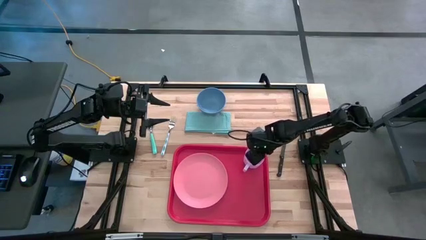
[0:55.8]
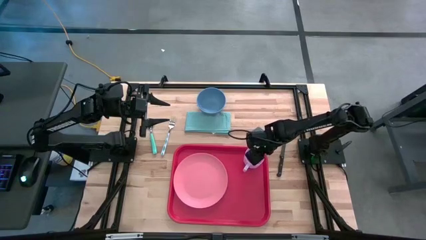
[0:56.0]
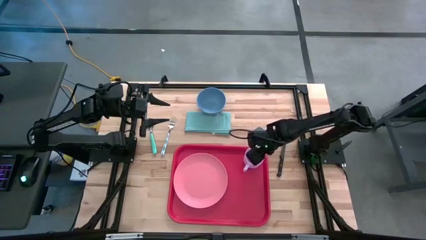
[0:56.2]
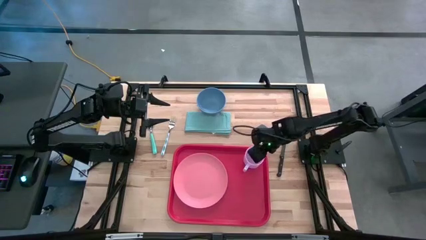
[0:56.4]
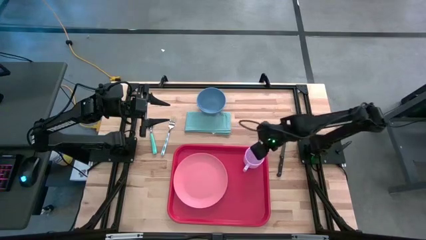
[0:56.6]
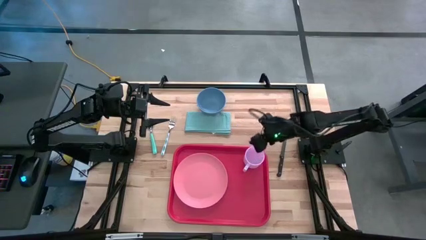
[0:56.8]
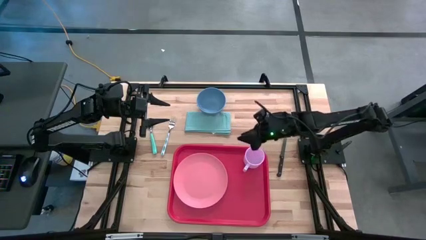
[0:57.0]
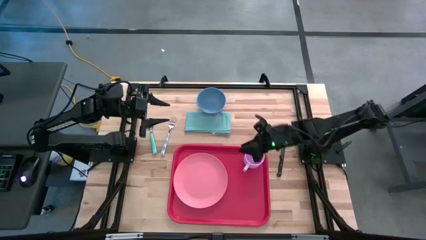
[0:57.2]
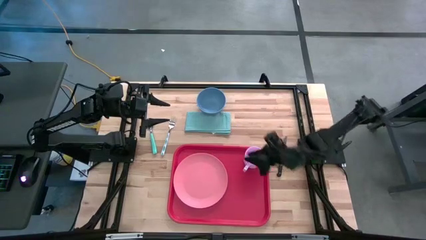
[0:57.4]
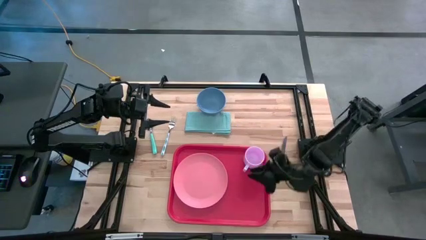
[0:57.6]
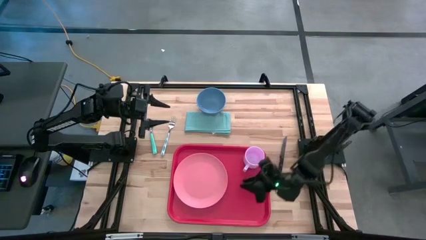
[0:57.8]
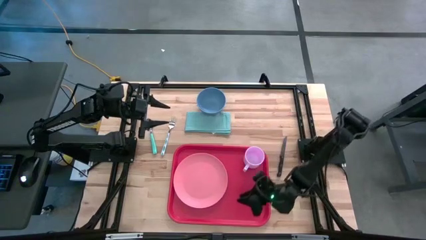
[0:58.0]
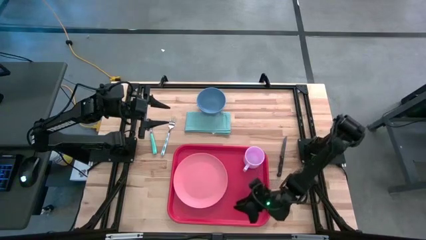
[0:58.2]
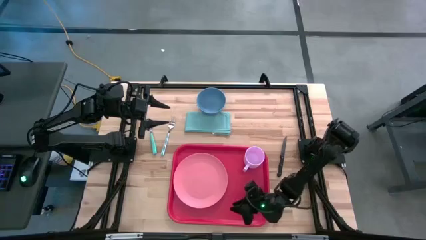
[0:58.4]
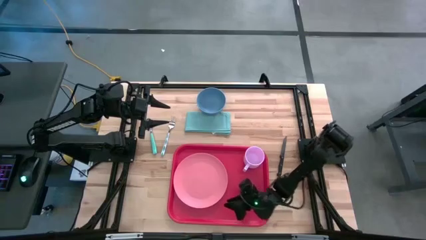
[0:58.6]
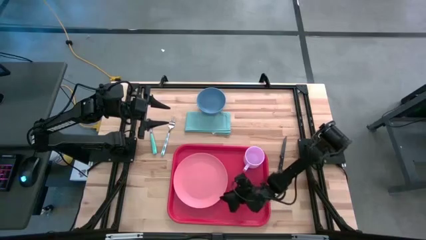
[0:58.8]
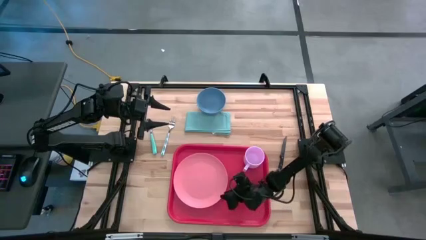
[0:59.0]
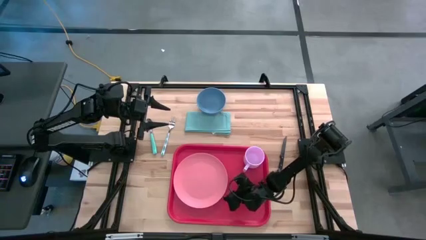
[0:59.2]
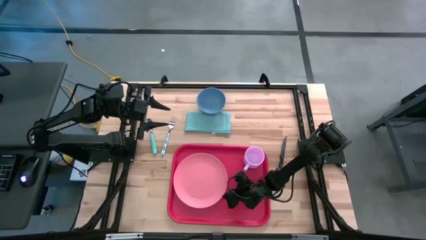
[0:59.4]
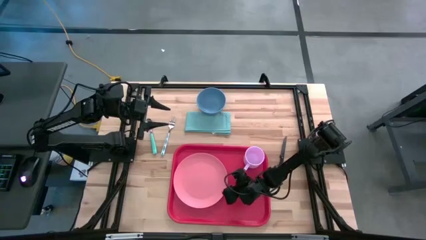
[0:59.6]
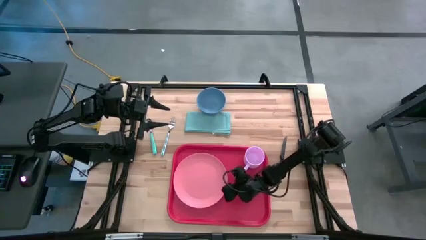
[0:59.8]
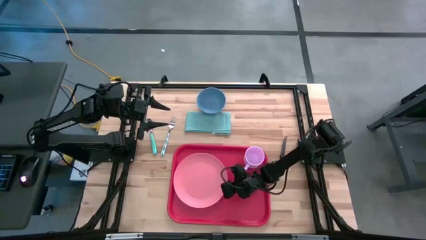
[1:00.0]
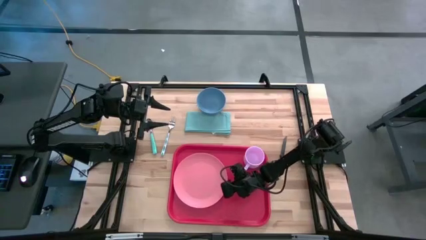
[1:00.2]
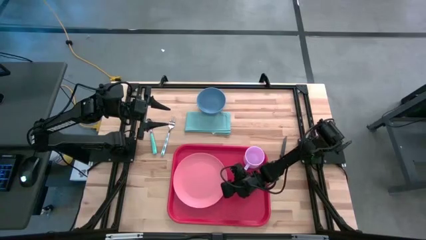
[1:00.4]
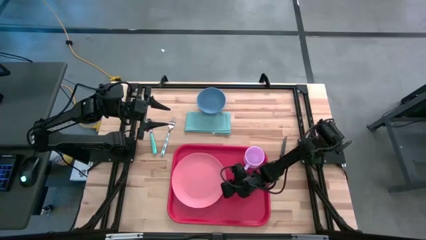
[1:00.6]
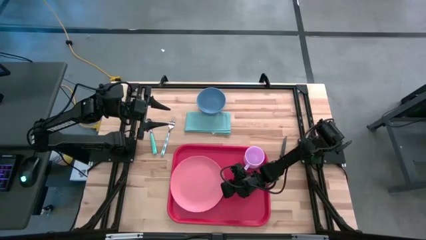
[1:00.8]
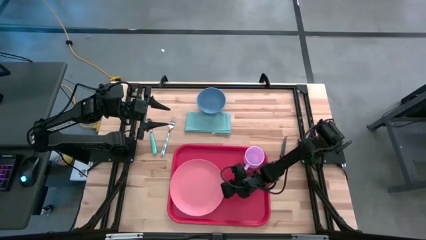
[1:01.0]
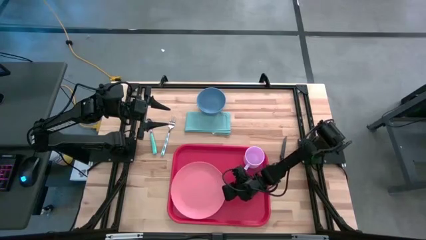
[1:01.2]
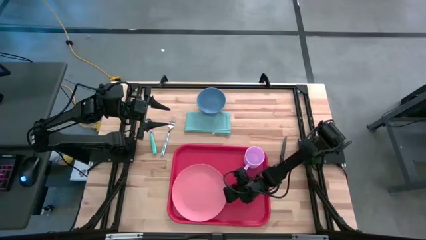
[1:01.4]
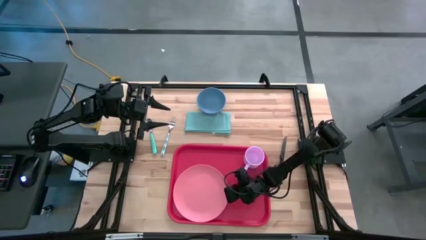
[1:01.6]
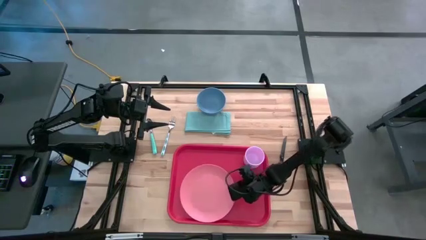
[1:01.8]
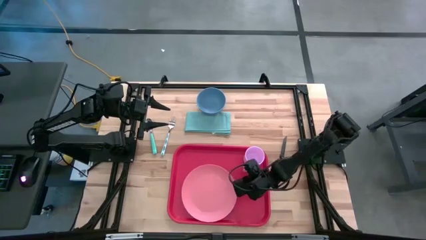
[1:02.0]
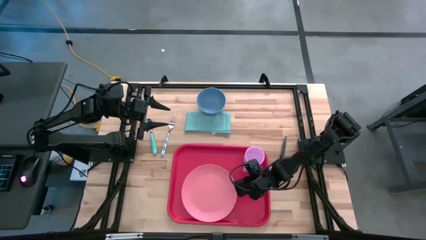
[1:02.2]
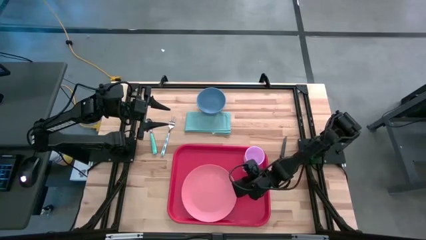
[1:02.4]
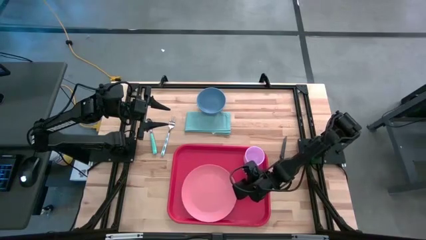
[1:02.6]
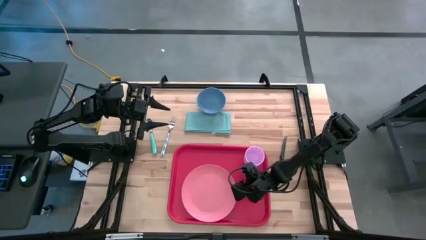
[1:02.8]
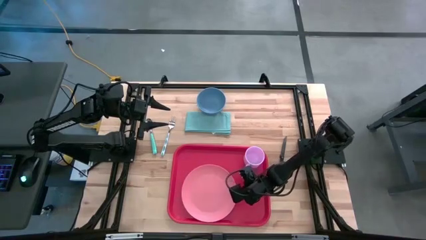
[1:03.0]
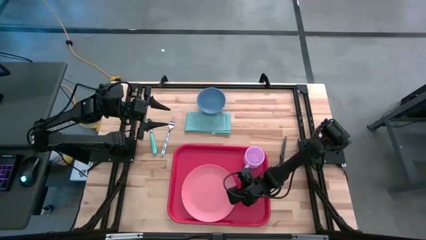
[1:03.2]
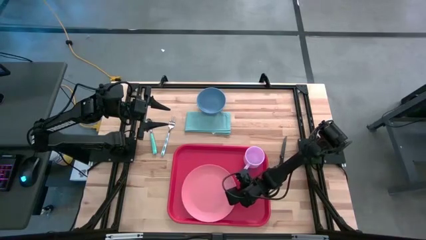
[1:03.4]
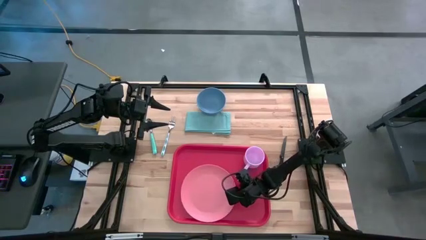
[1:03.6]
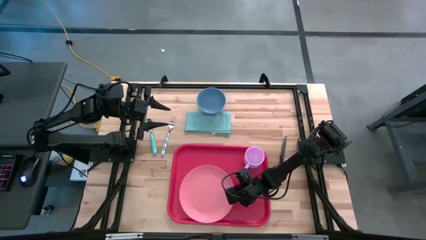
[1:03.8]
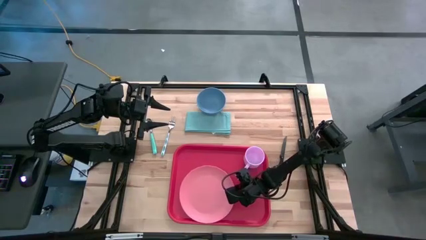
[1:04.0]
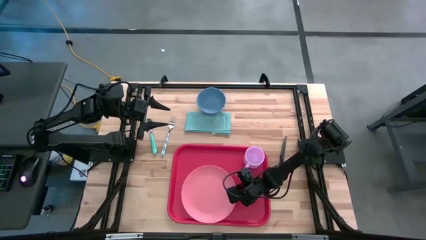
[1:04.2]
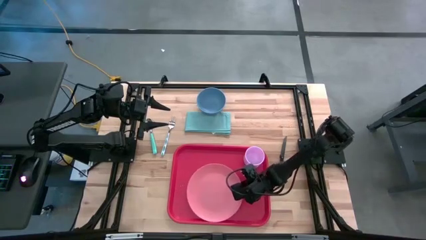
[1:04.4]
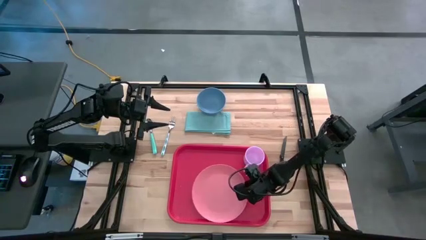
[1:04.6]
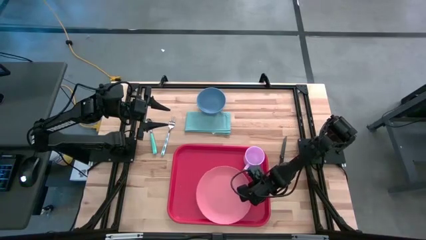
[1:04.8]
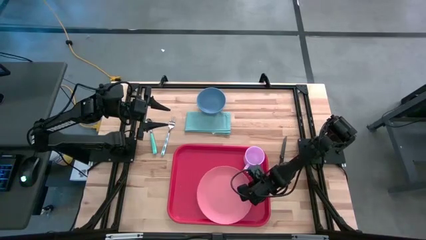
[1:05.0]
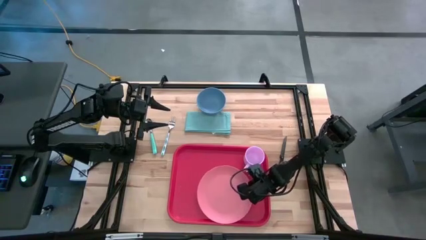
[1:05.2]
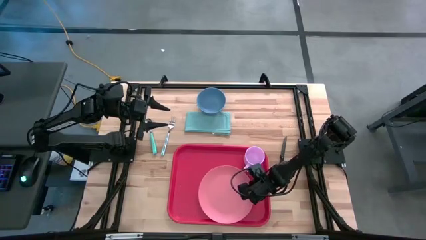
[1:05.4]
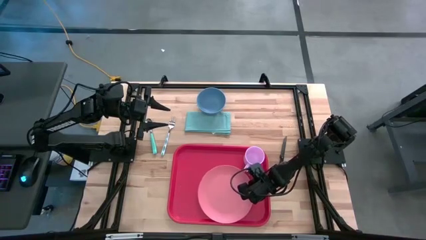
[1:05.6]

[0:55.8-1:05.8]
Task: Set up tray
Adjust the pink plate

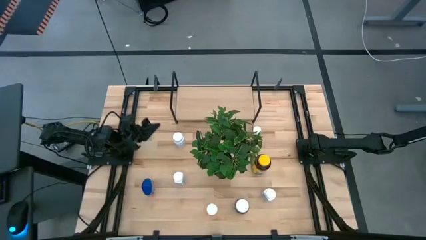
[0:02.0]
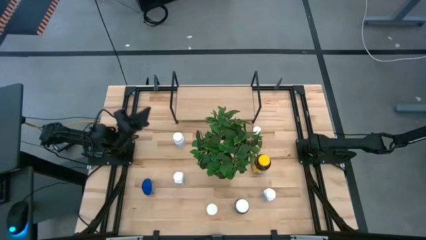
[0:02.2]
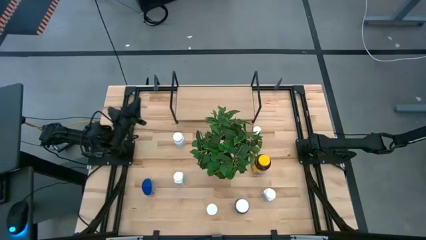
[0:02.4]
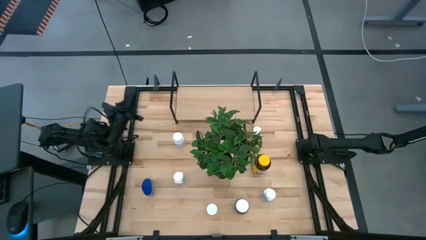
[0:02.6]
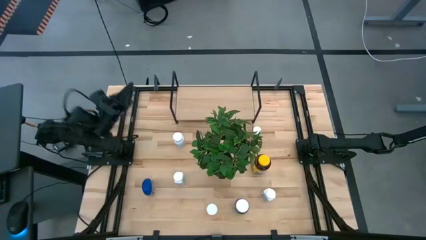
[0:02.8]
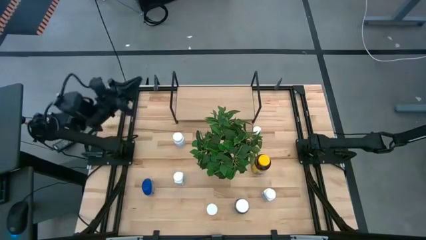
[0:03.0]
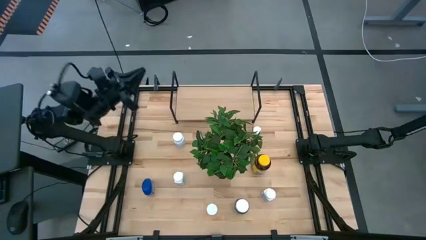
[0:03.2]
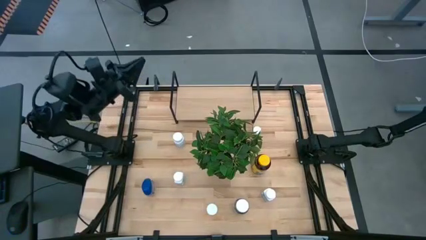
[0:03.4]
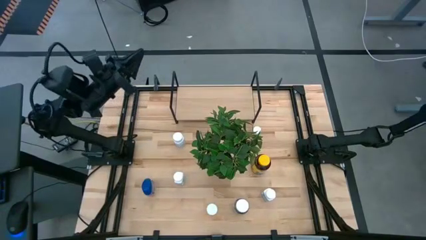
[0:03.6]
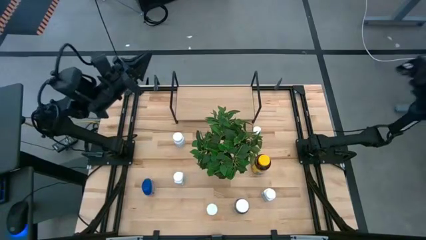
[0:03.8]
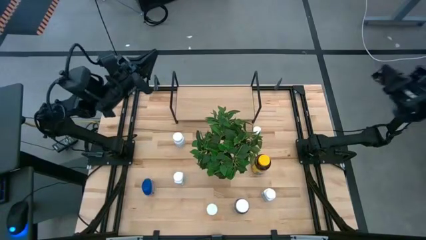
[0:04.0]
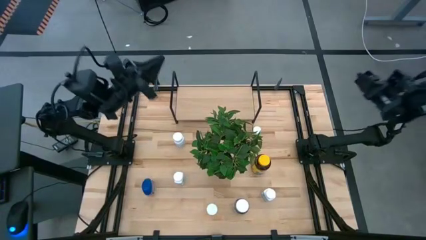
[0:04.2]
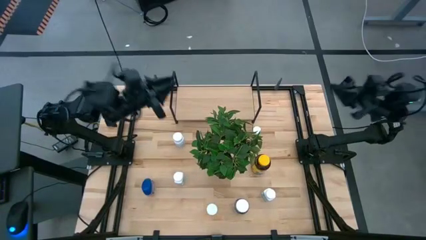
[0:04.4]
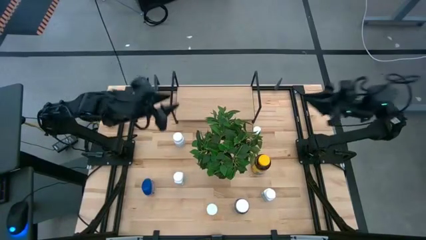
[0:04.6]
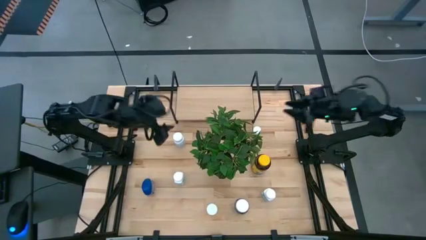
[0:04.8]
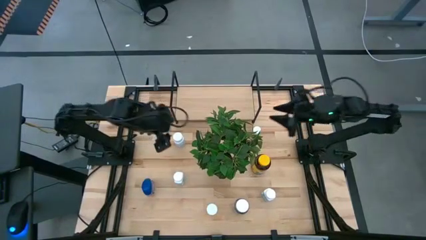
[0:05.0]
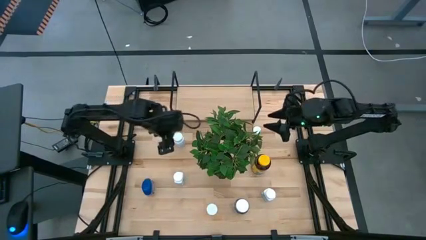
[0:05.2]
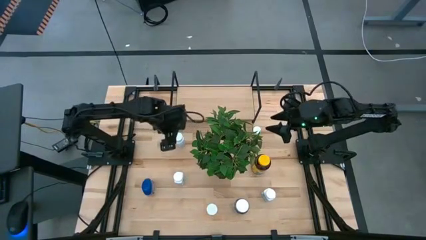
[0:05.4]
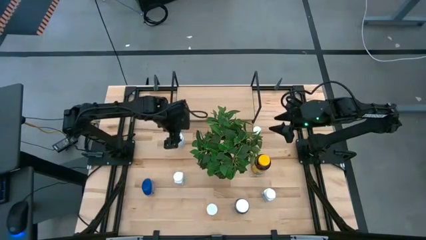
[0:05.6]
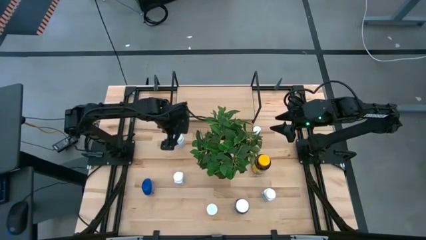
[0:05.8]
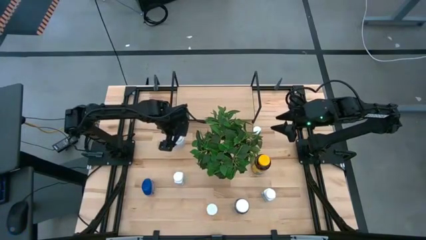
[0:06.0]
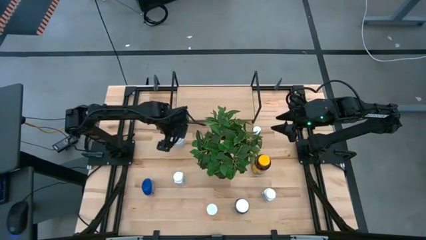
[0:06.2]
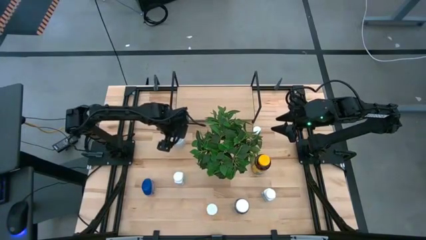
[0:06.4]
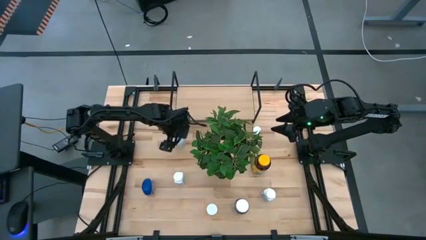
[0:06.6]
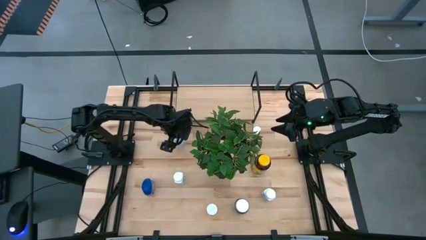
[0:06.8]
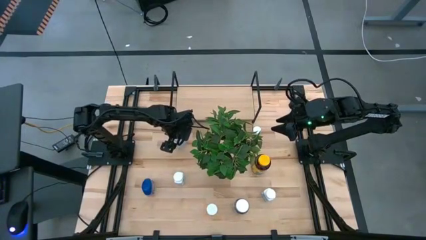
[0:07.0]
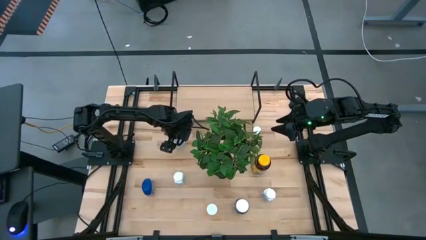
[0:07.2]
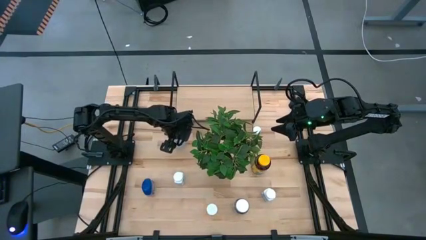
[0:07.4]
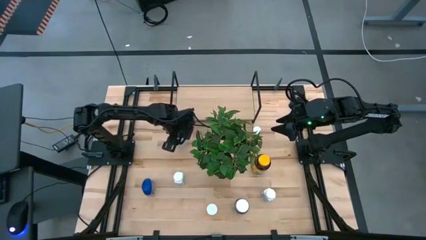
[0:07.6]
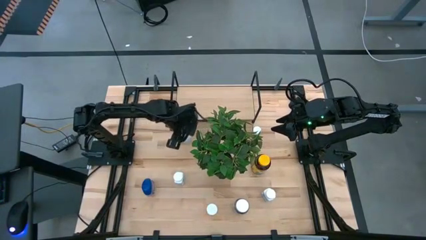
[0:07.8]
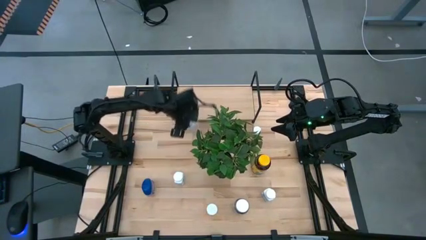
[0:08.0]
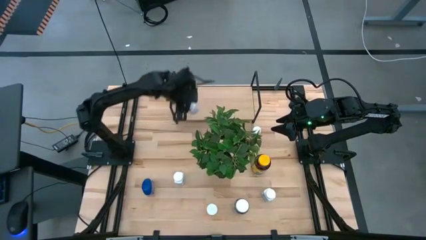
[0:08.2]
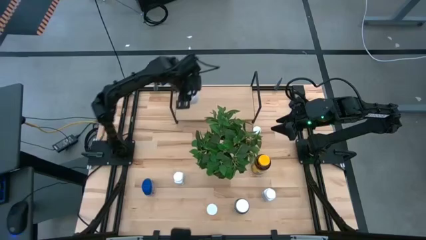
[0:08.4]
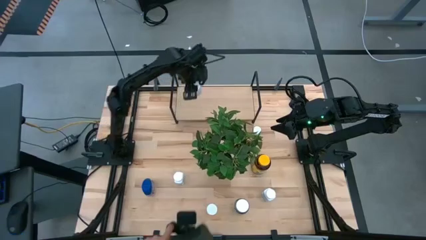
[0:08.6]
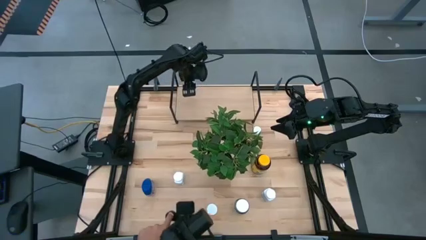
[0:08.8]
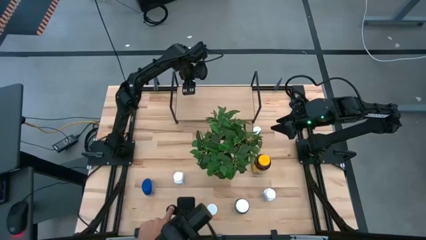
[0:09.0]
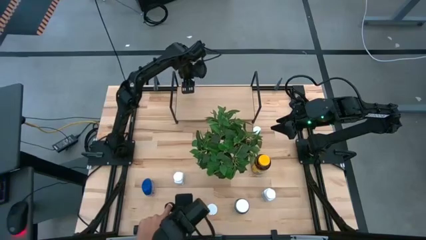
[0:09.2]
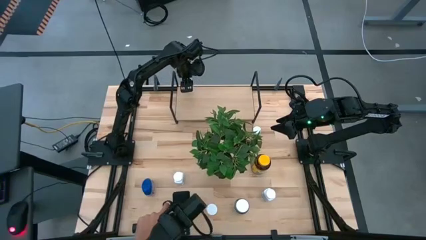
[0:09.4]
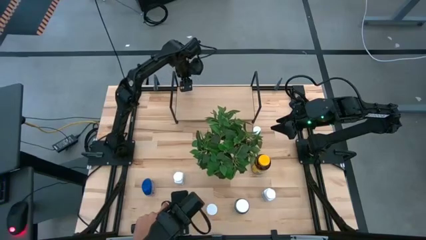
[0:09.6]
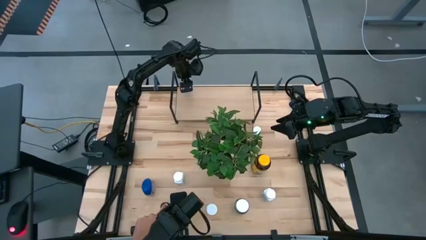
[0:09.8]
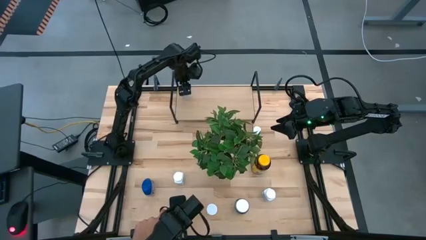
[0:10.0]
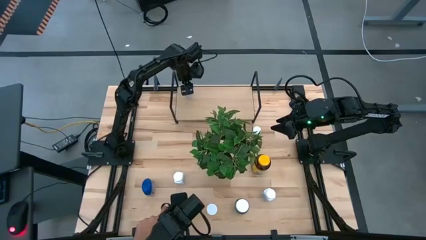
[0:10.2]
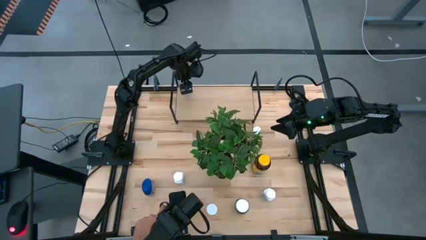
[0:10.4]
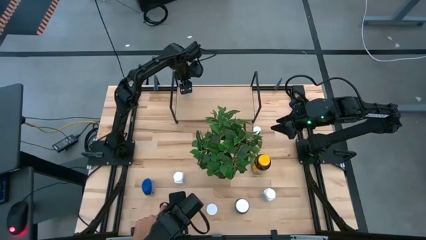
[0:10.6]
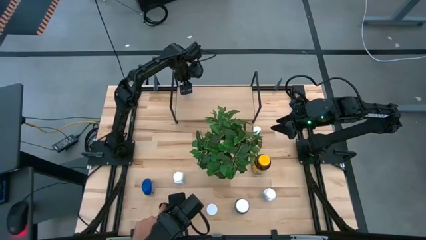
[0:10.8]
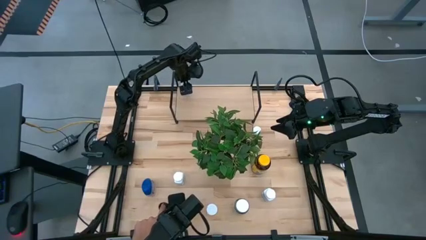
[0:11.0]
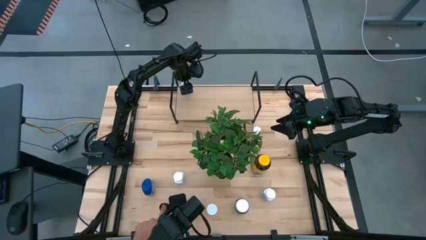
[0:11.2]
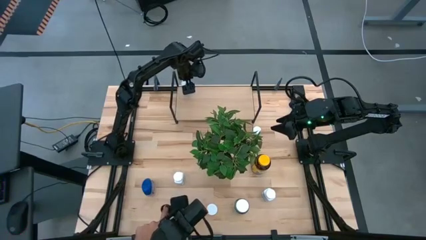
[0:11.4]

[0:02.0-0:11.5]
Task: Pick and place medicine bottles onto shelf by color
Put the white pill bottle on the shelf
